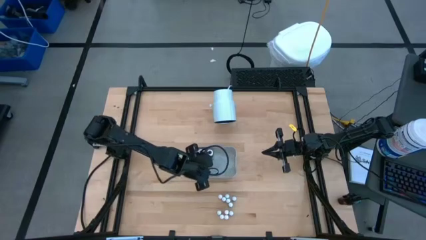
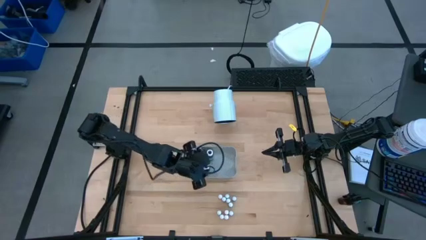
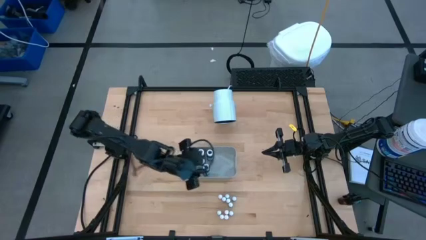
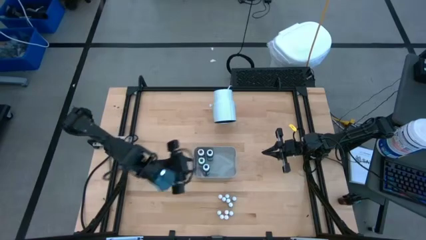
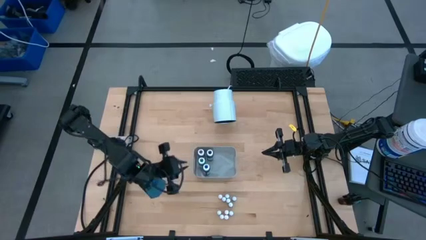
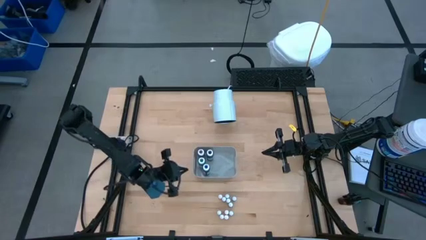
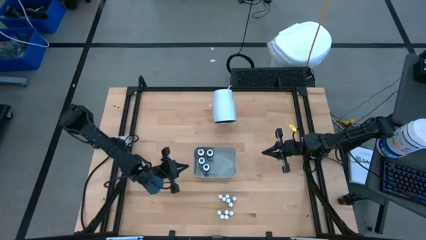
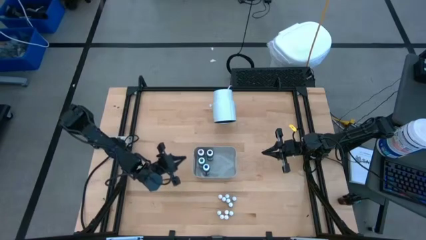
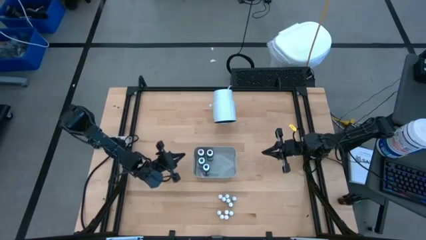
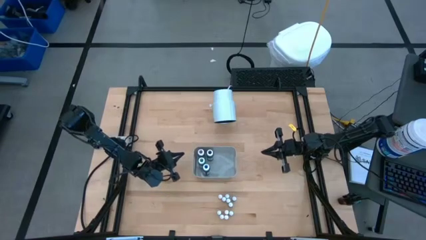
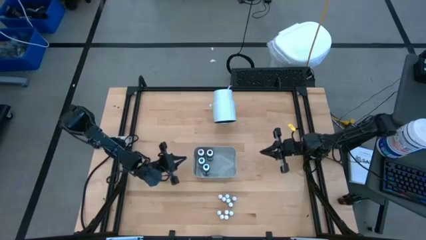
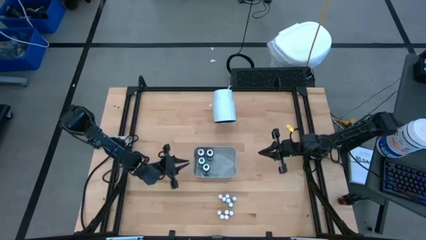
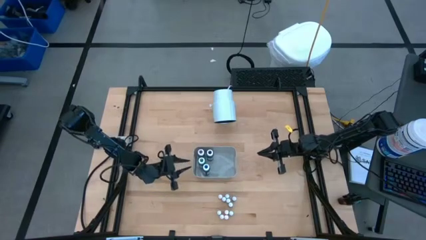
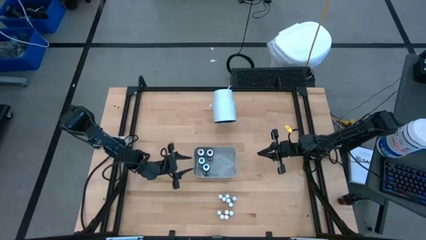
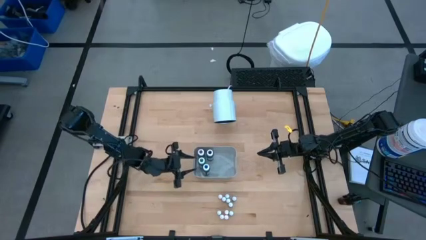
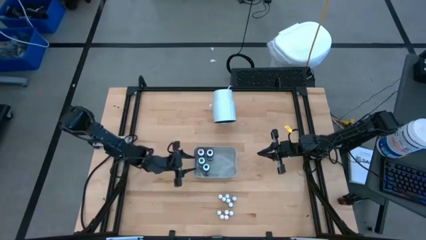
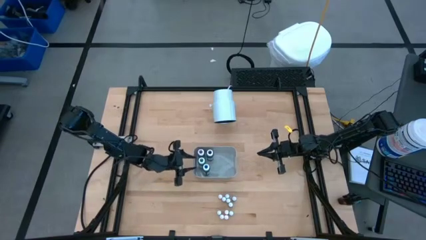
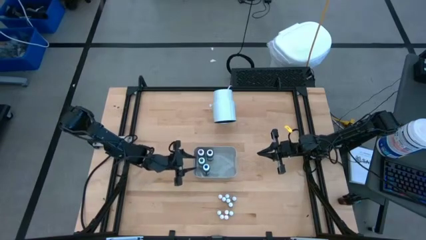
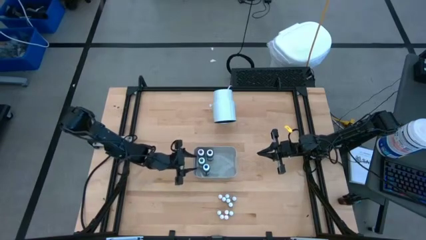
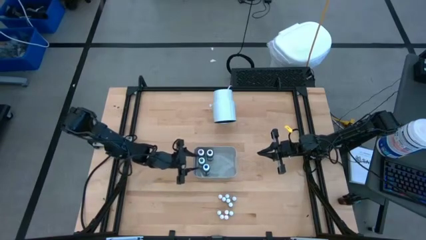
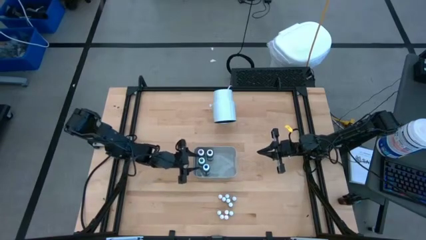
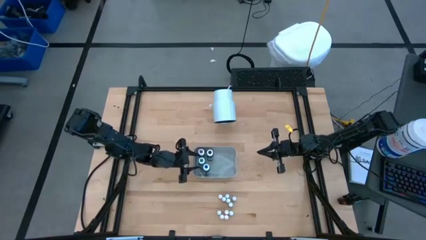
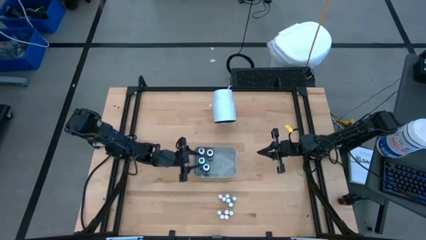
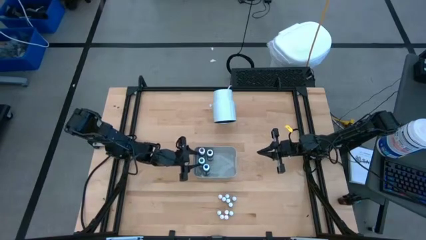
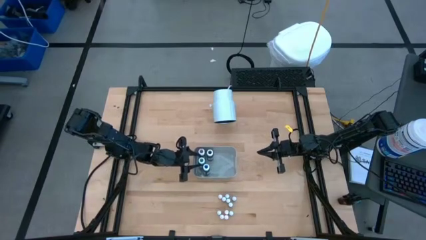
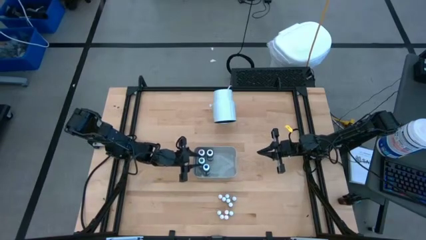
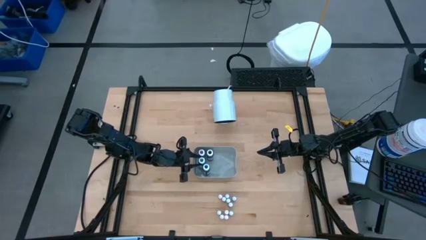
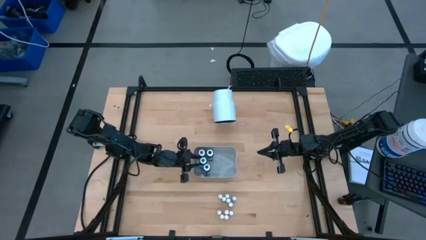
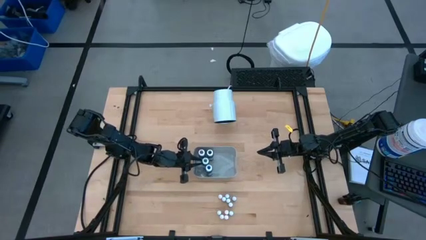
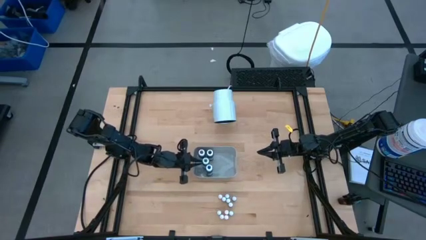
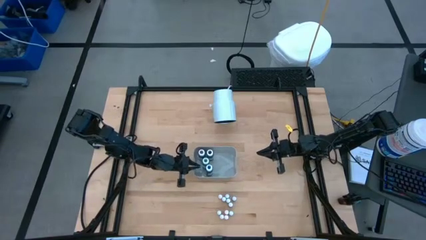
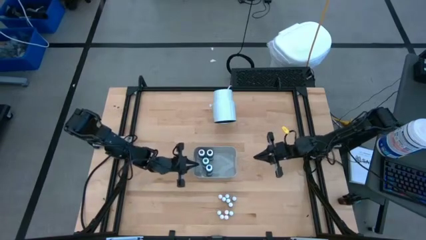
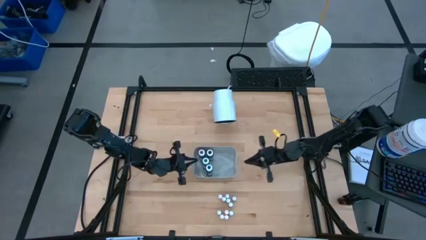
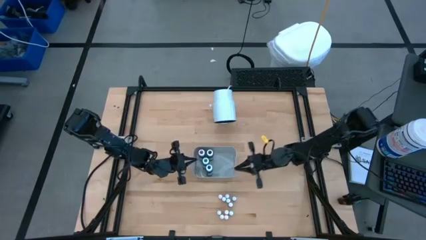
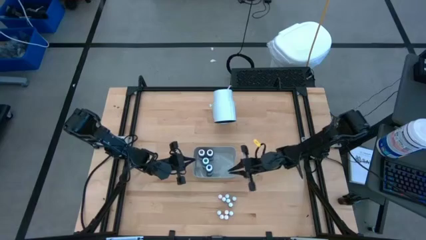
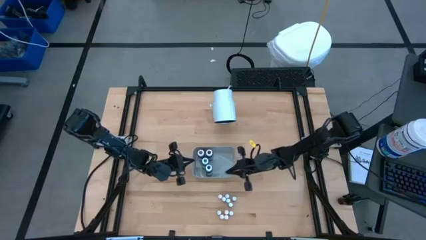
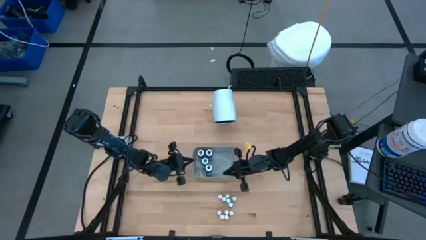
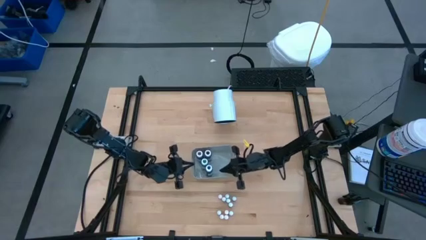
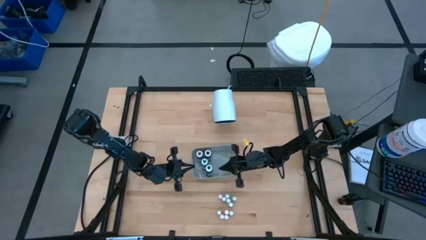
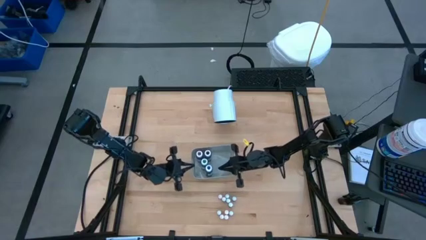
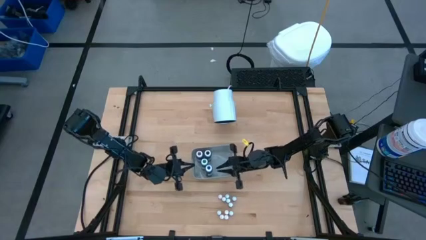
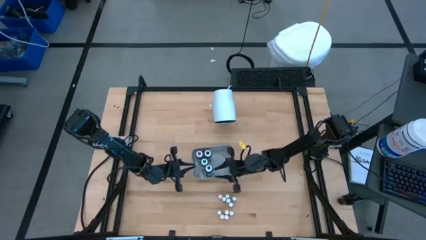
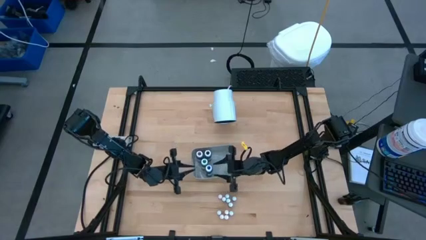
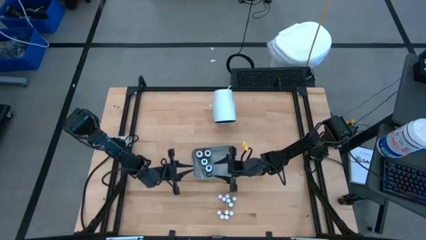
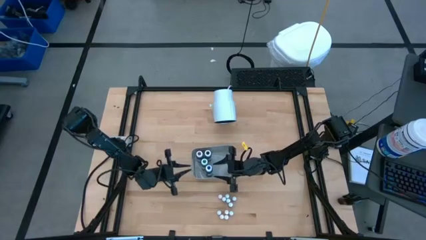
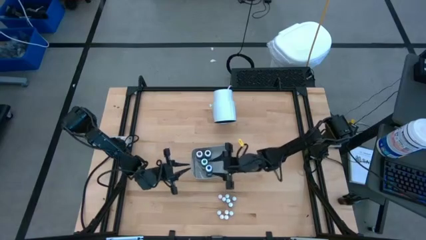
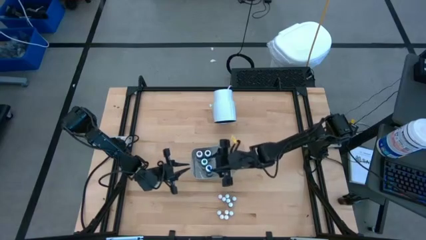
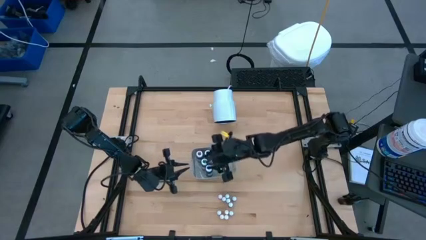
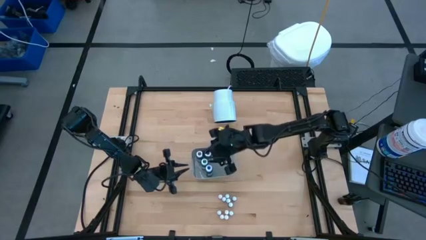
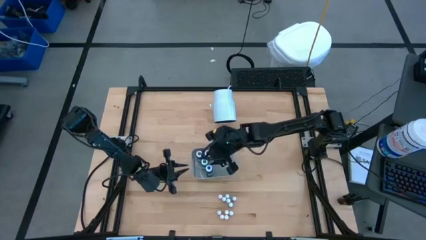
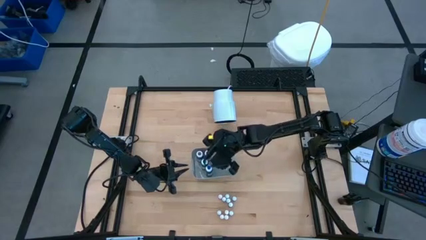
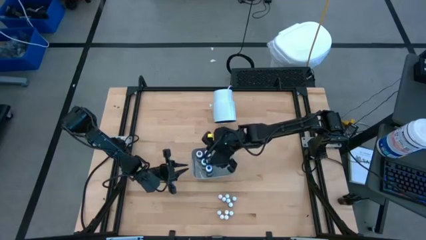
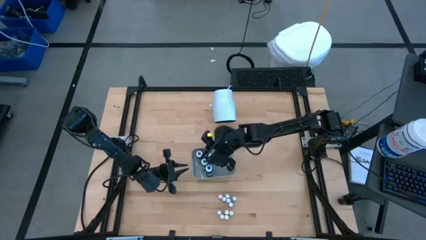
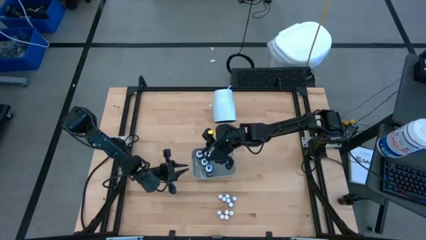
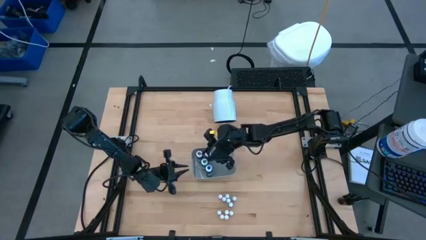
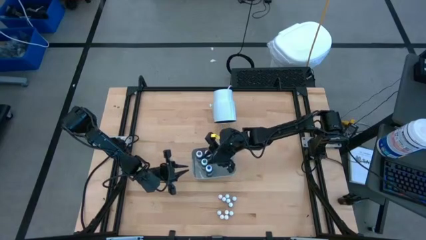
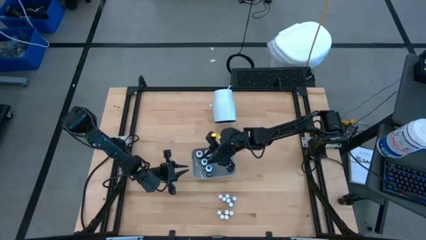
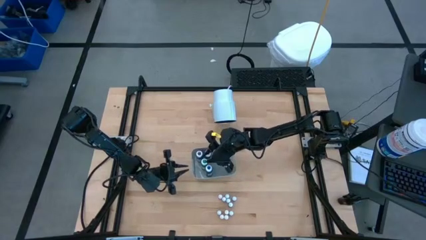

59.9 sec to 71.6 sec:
Task: Pick & Place food coloring
Adjust the large green food coloring bottle on the gray bin
